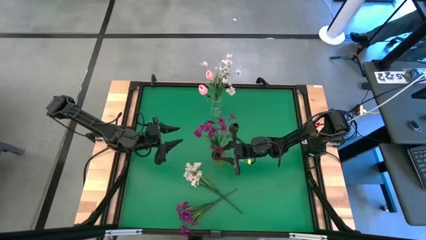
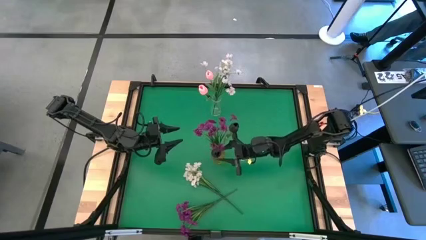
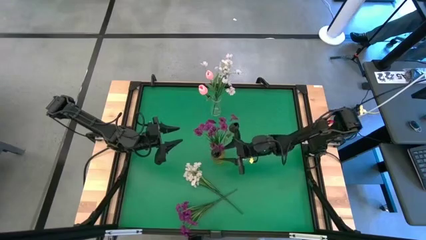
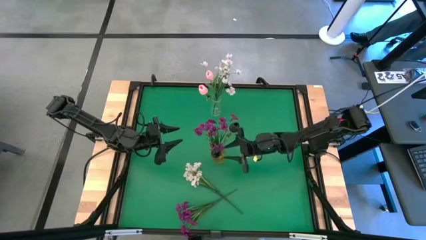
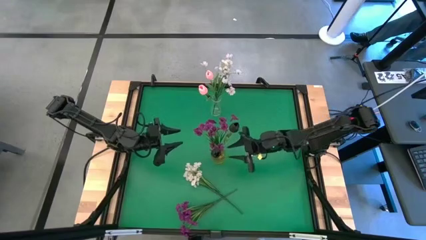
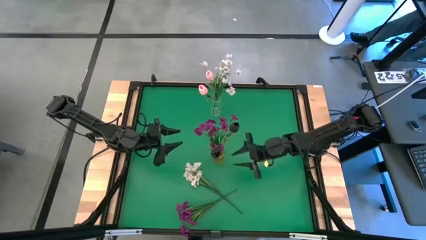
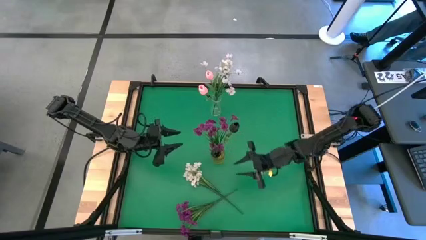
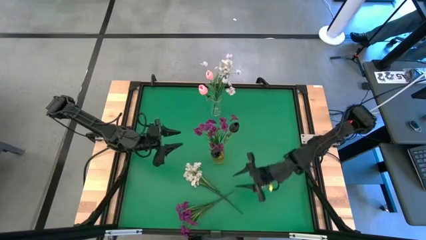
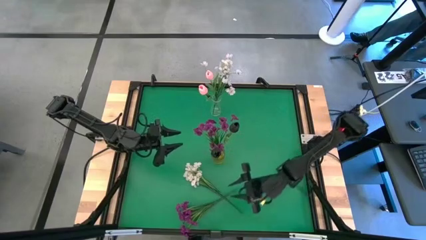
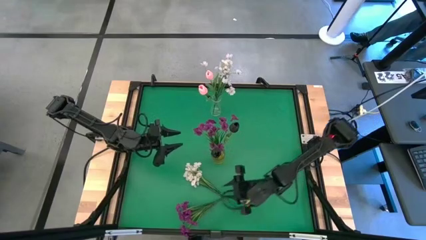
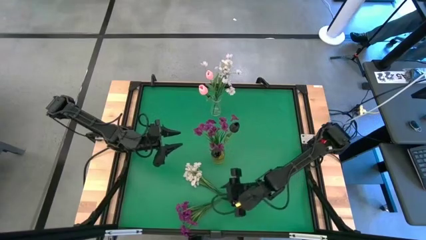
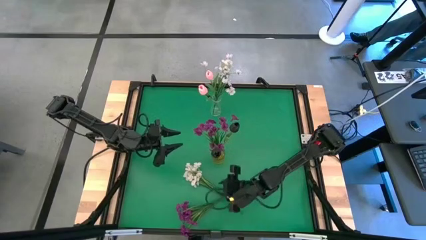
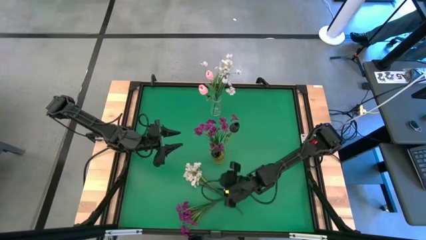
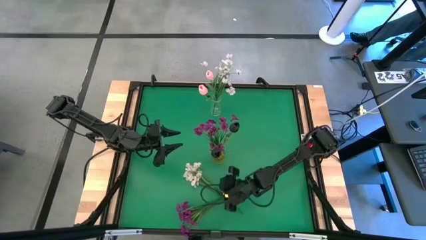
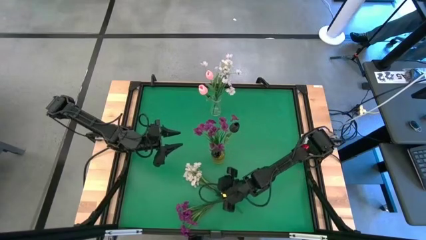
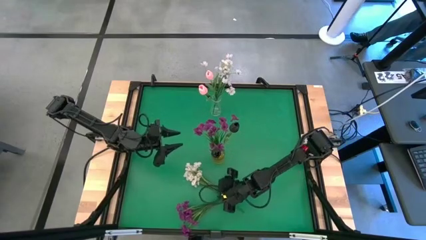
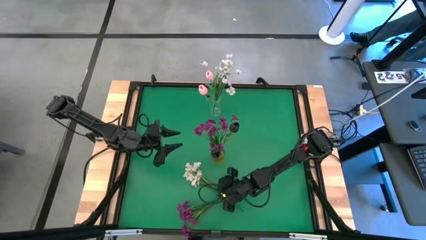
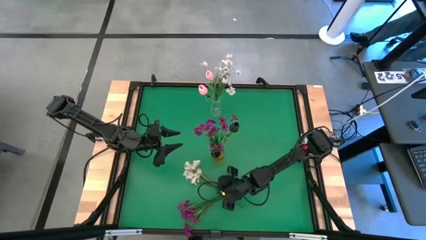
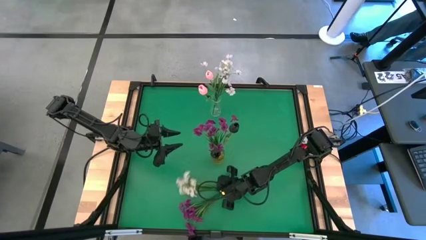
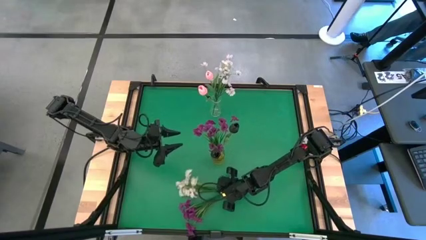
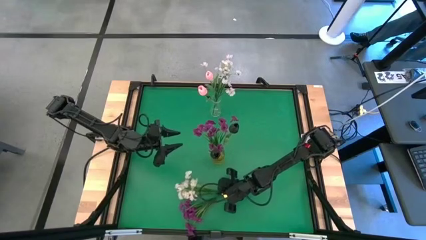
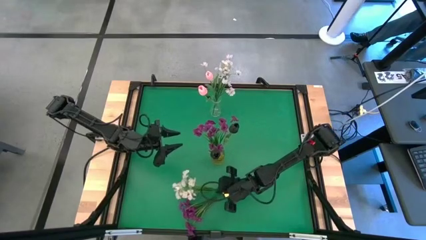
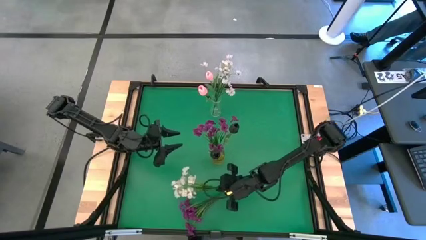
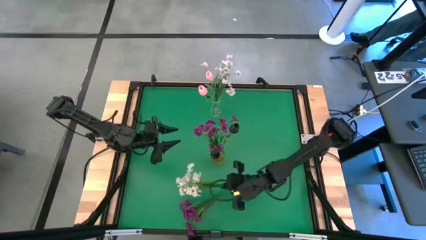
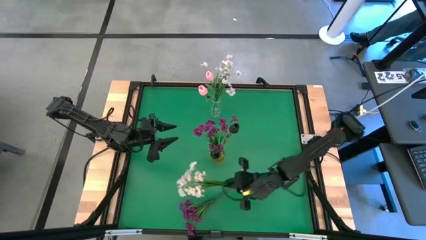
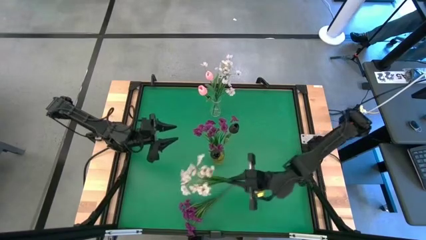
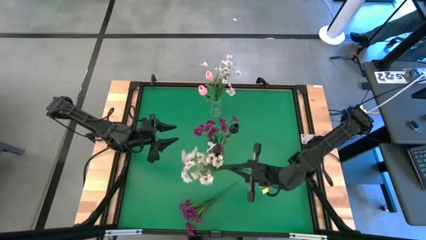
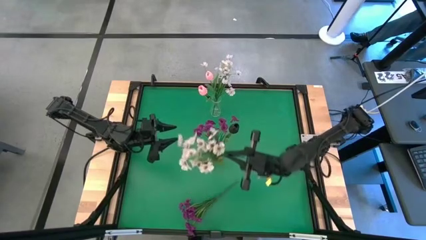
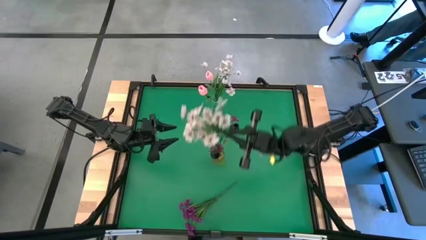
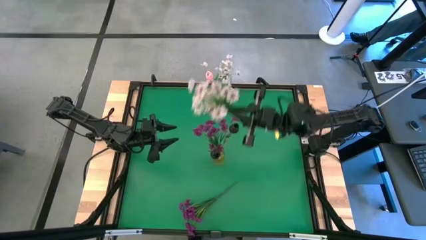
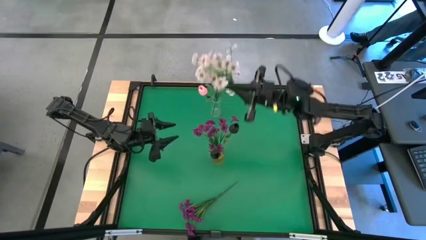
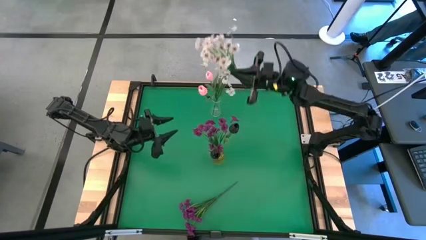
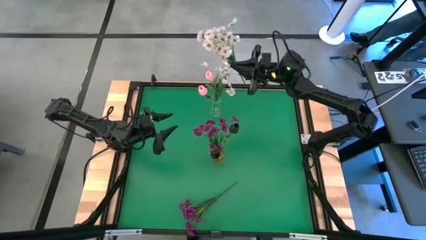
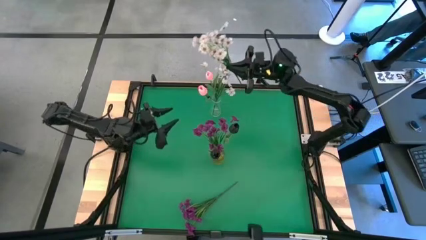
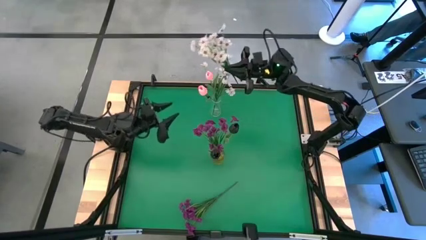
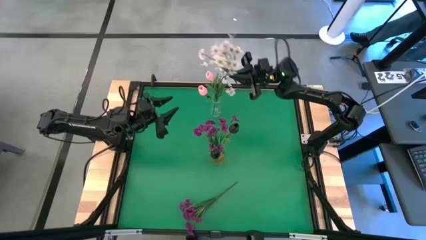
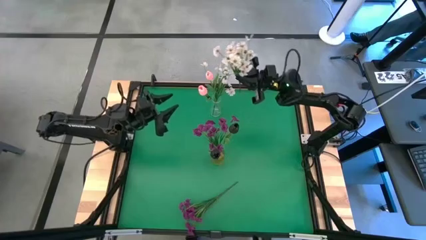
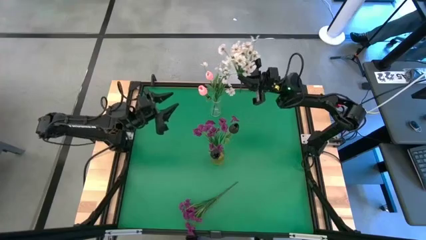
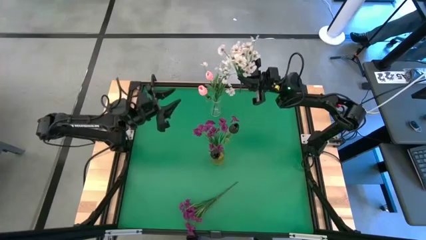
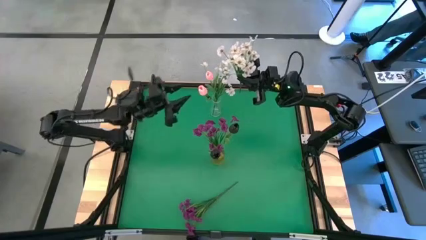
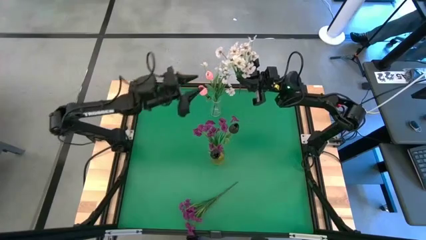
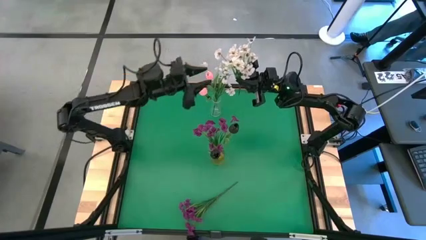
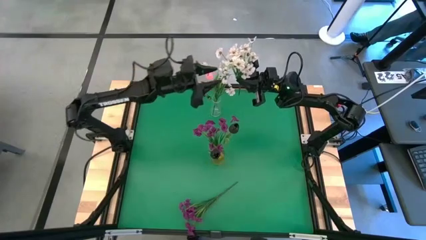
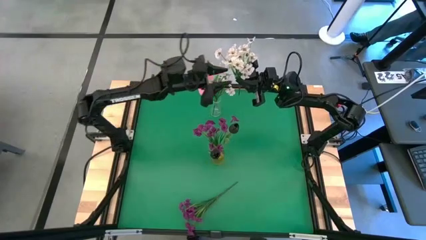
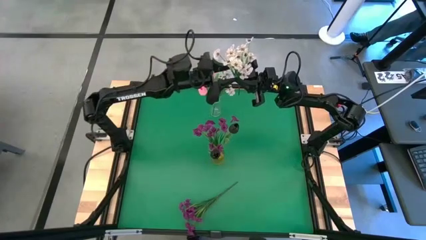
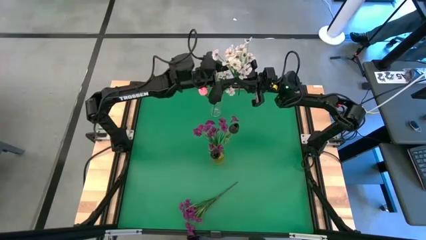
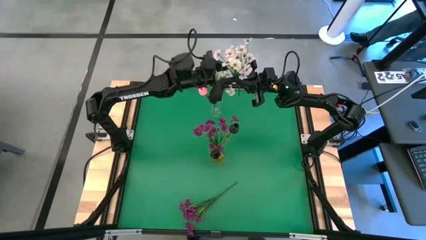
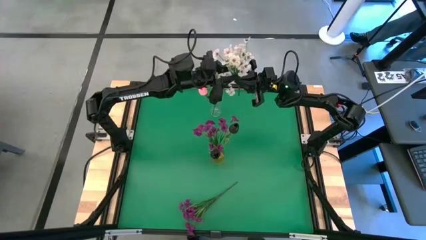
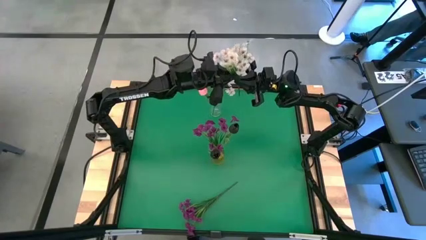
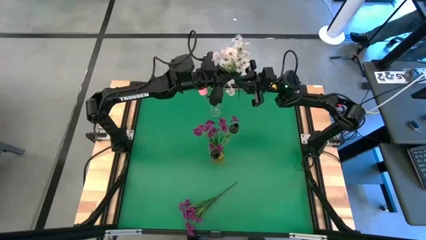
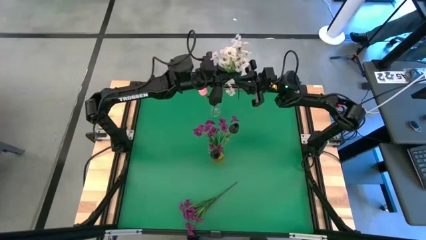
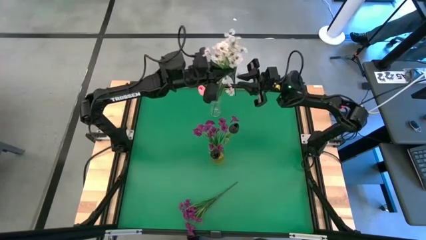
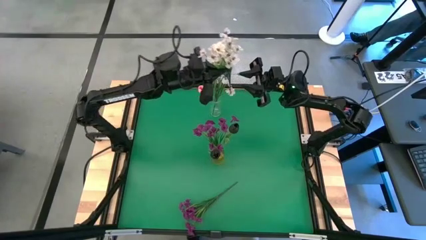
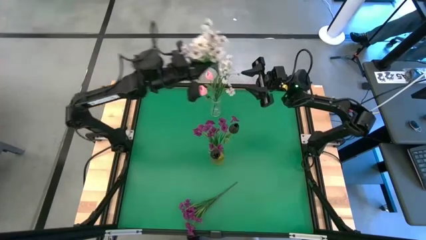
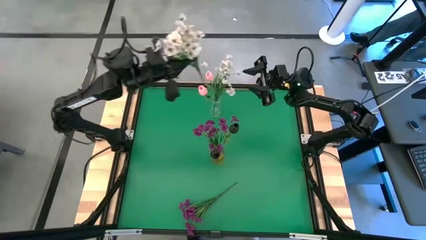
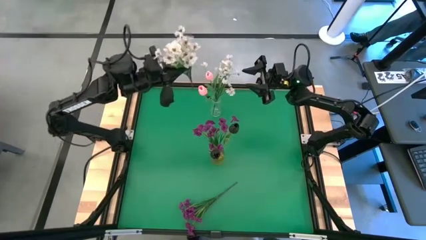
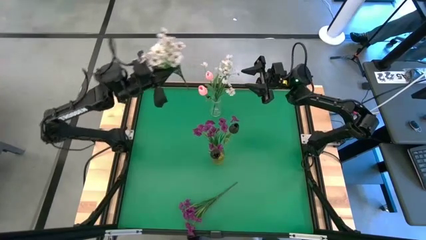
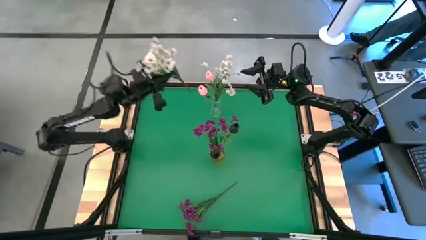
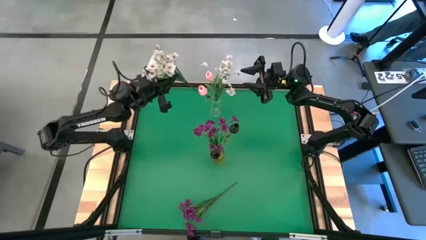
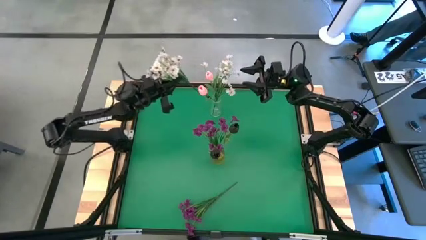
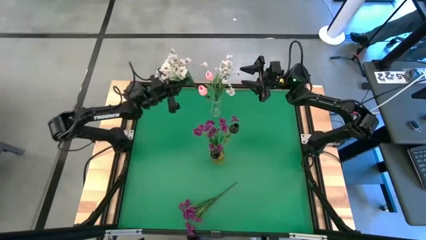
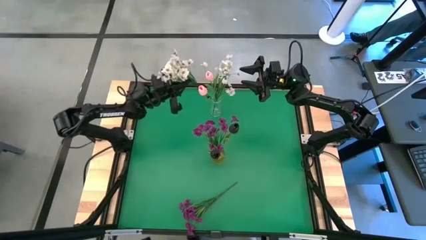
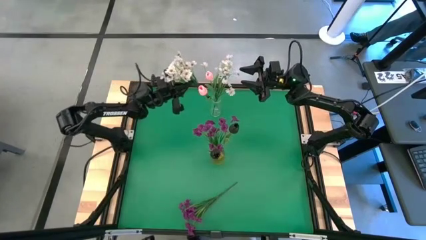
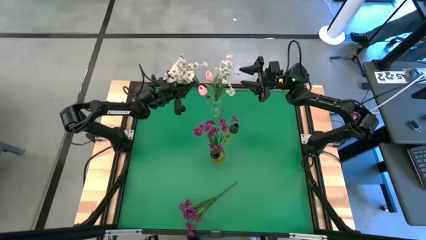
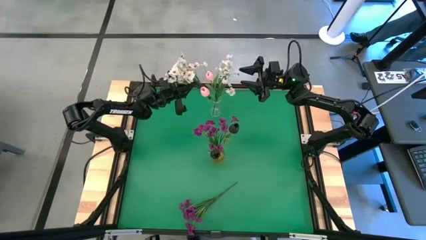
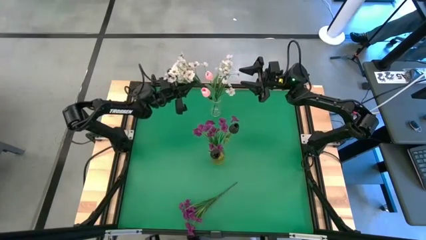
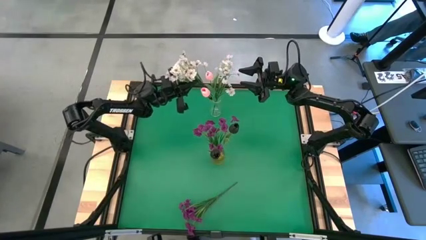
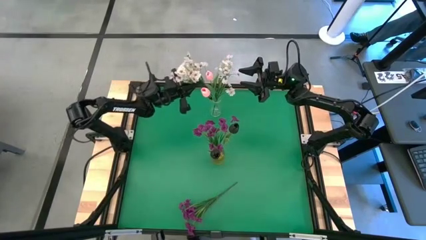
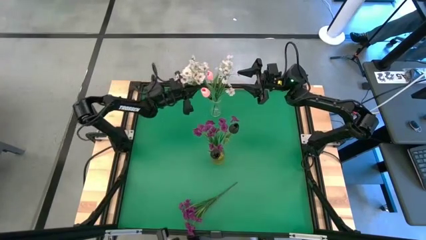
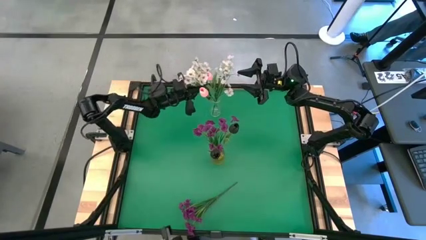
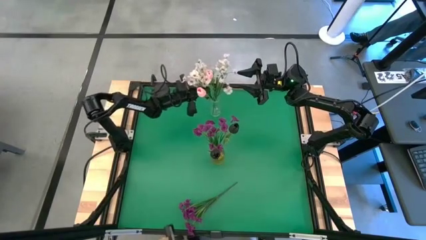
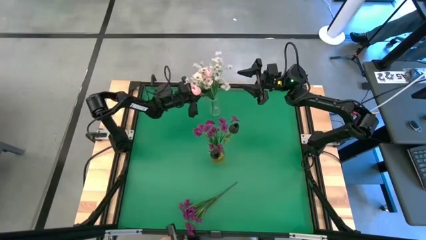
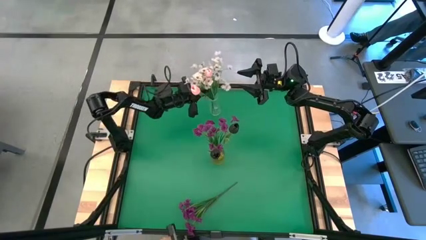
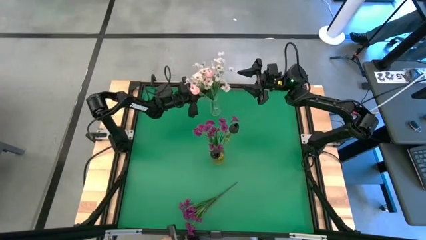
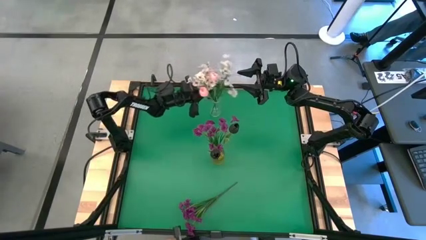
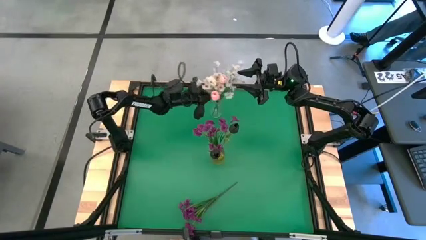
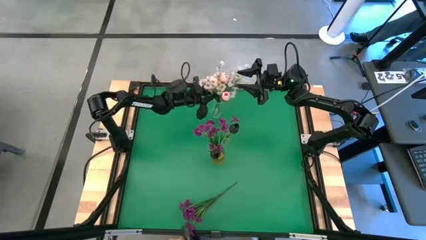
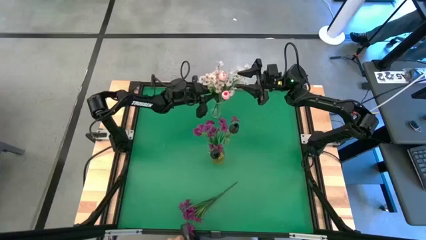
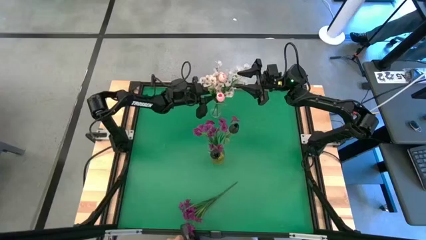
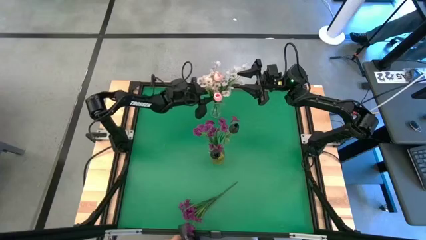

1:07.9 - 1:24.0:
Task: Sort flowers into vase by color
Put the white flower into the transparent vase

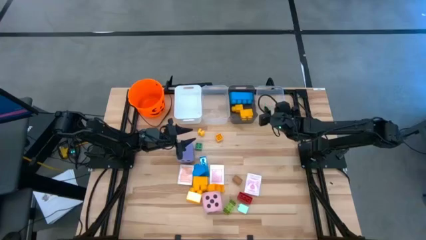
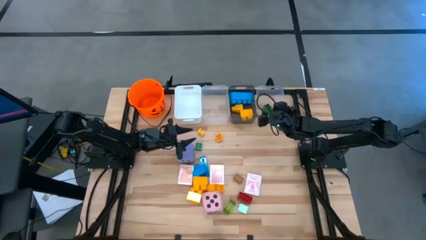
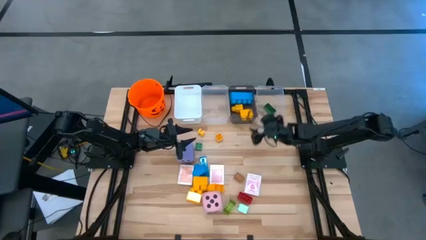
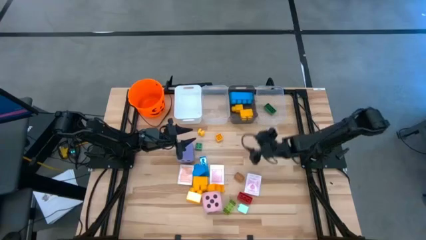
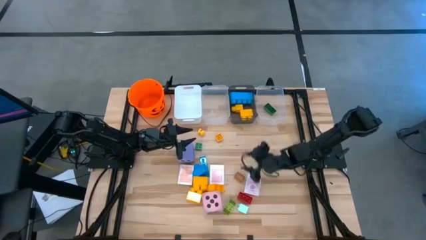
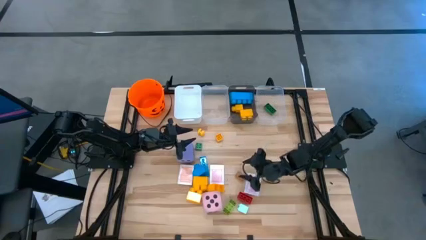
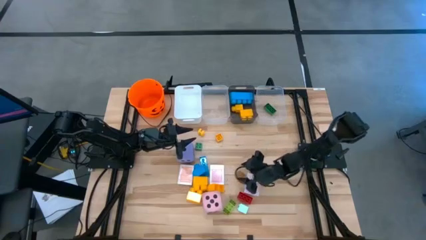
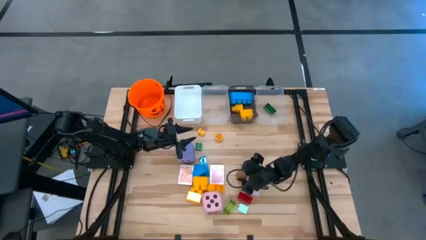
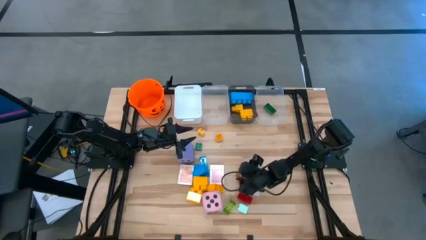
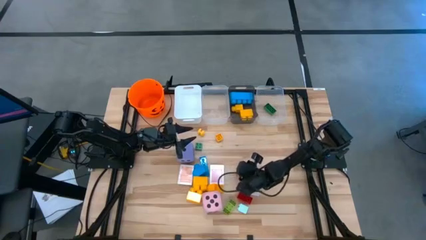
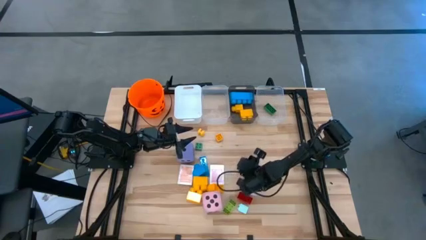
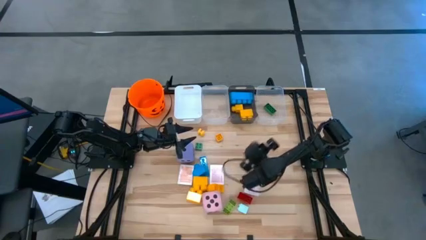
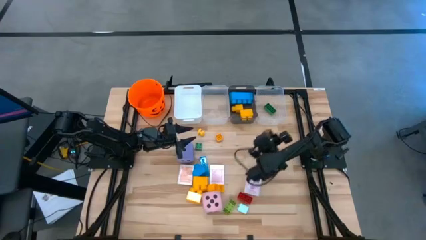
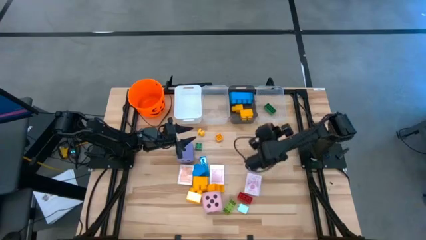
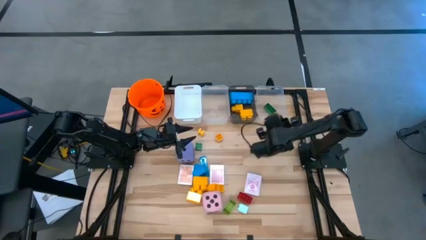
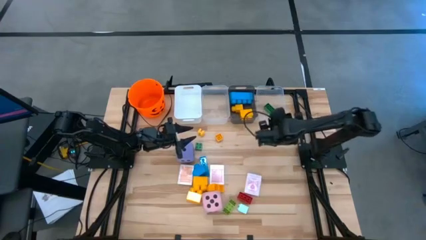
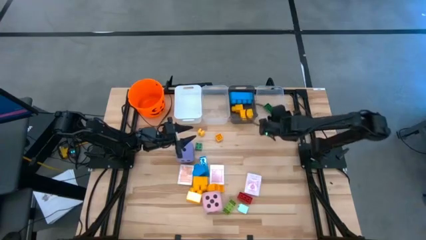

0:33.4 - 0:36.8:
Task: Pick & Place Toys
Put the small brown game piece into the right transparent bin
